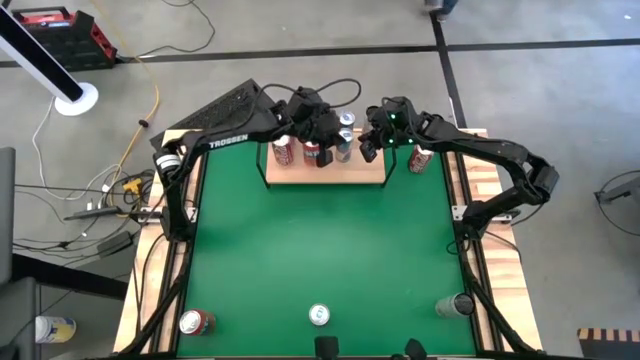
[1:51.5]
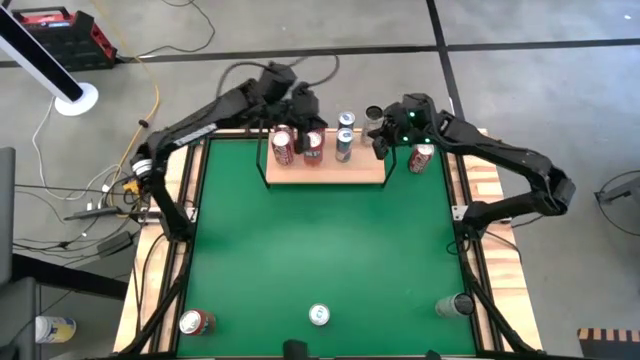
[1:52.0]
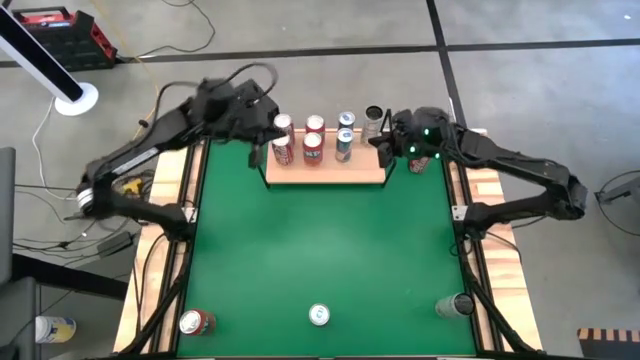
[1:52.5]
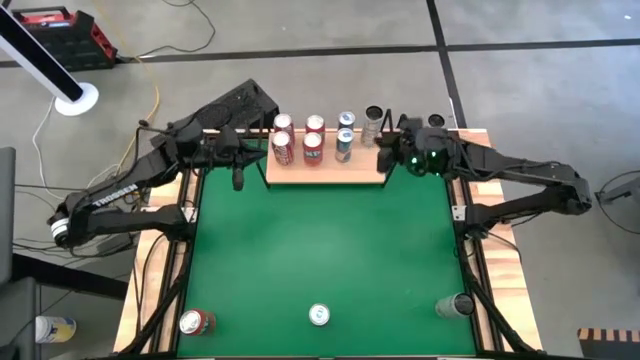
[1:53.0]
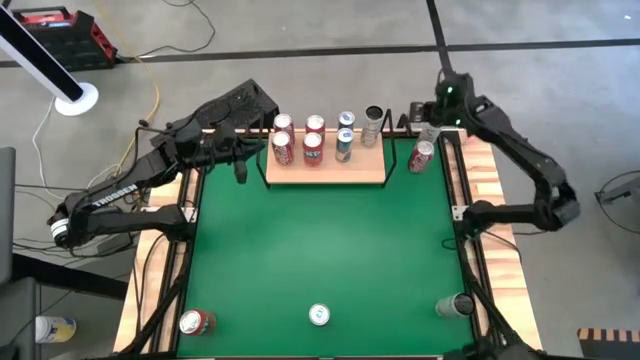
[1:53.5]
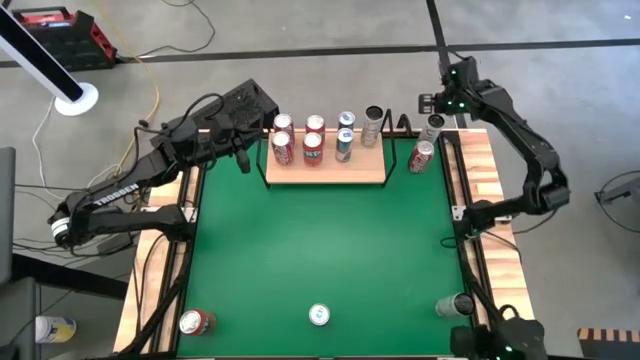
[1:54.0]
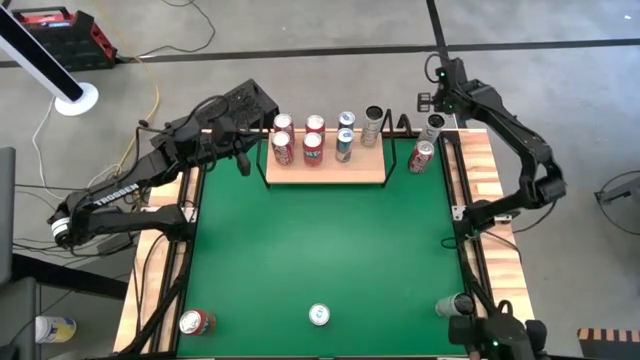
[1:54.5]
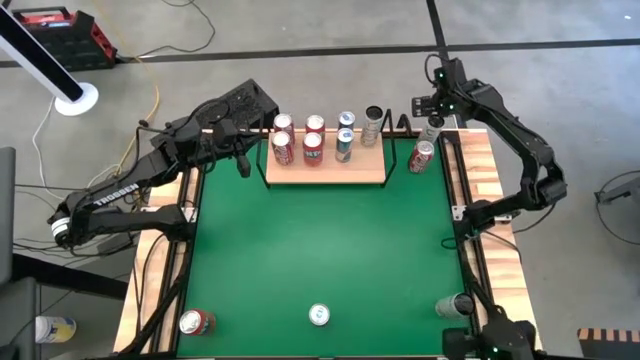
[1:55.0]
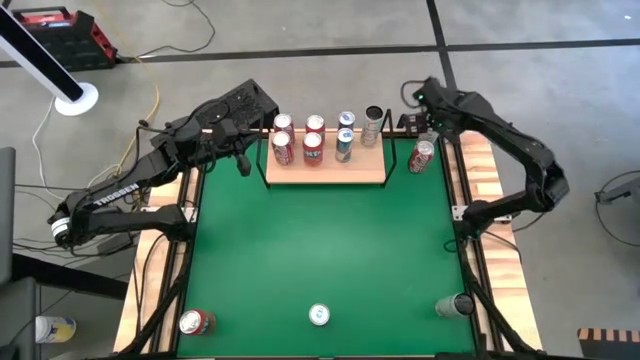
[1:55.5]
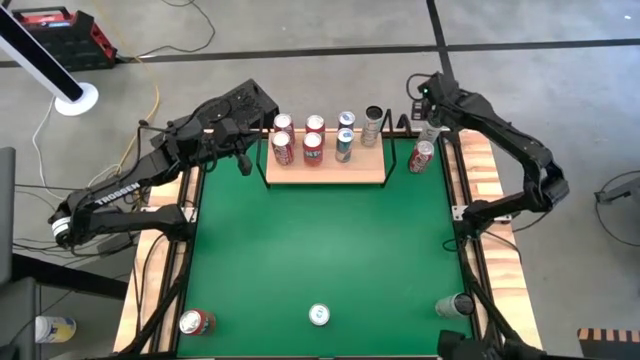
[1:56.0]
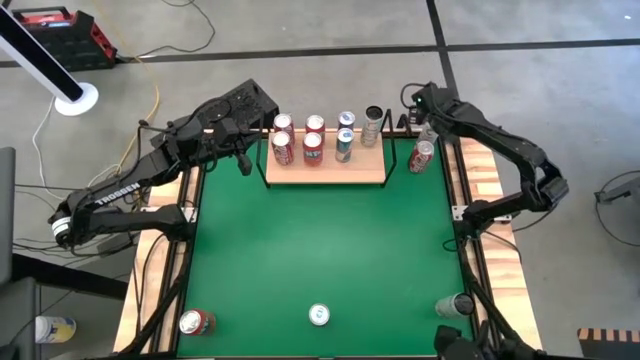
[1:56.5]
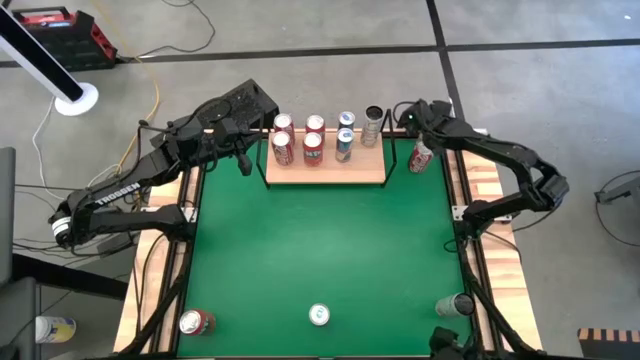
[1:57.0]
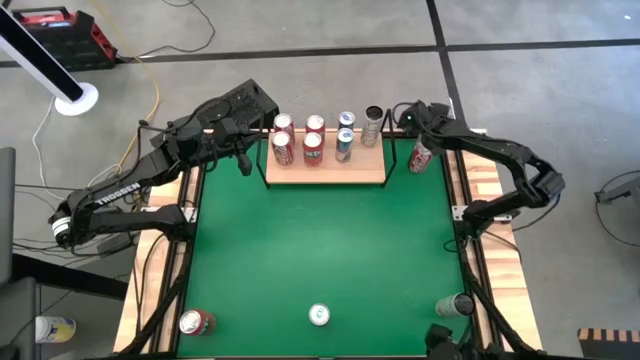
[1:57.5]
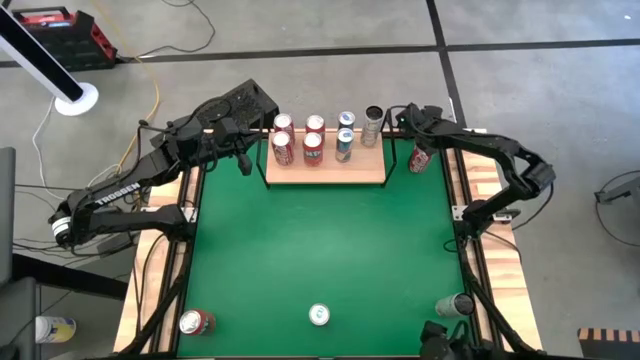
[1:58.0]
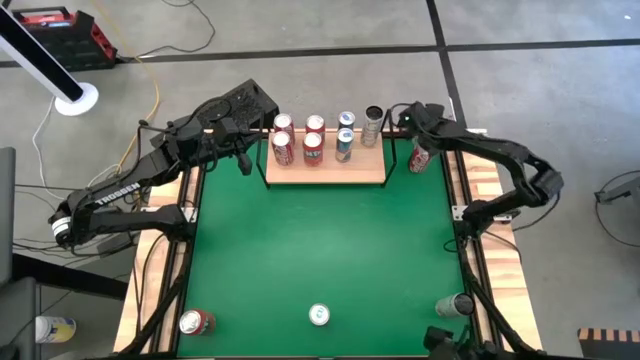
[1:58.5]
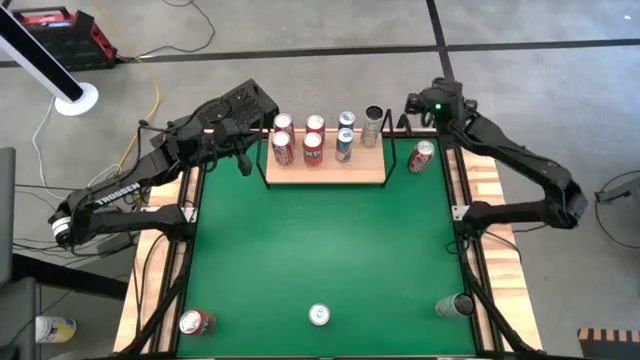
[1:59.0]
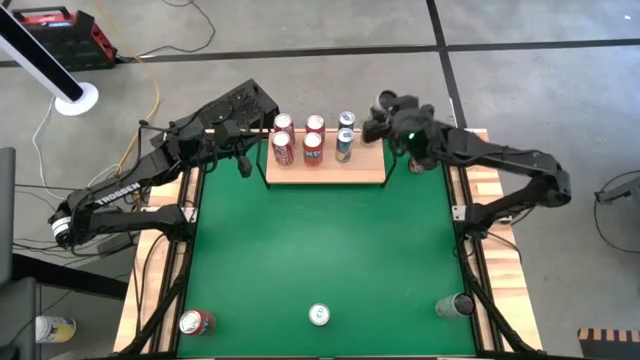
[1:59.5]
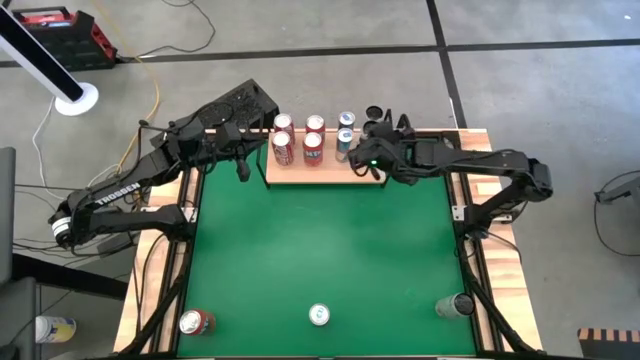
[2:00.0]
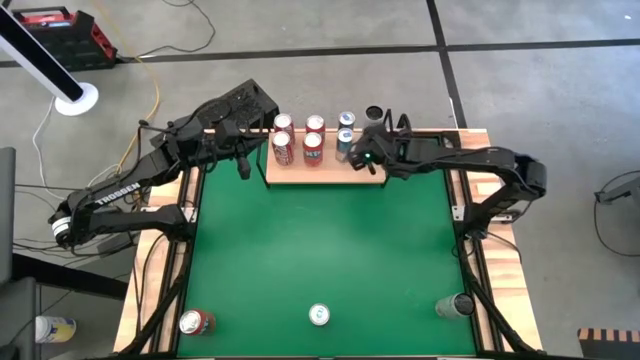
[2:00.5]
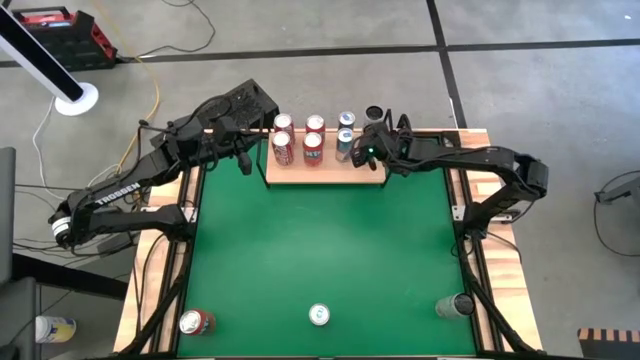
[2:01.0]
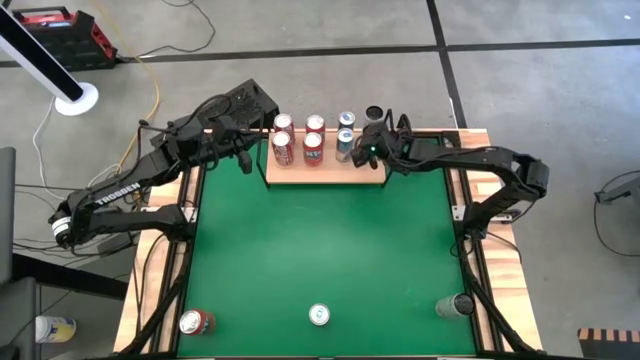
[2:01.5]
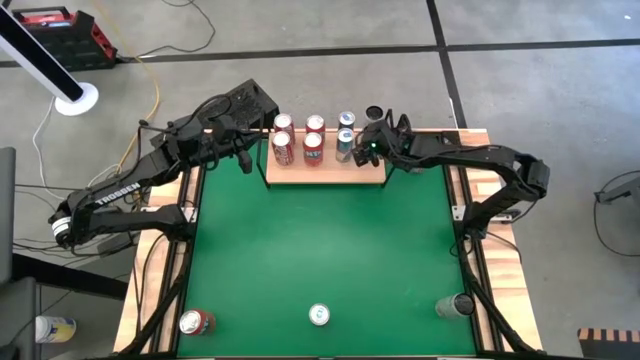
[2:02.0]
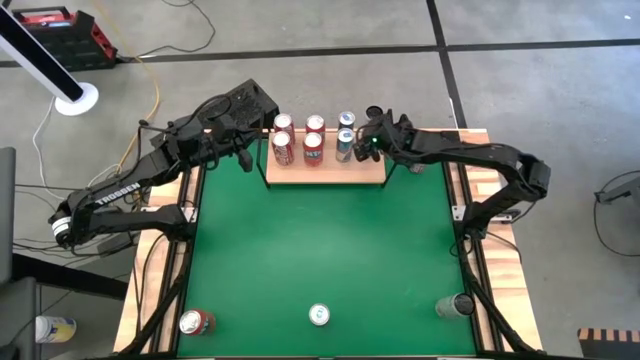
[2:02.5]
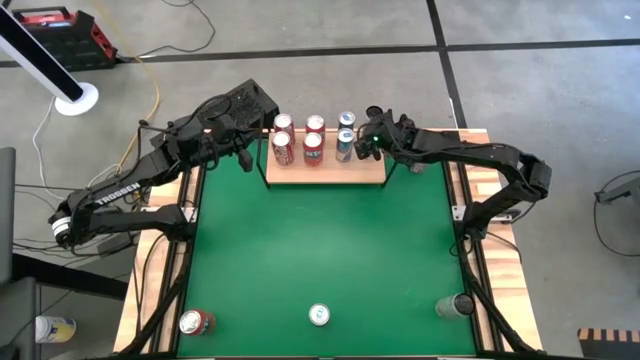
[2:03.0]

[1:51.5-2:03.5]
Task: Place canned beverage on shelf
Put the top white soda can on the shelf

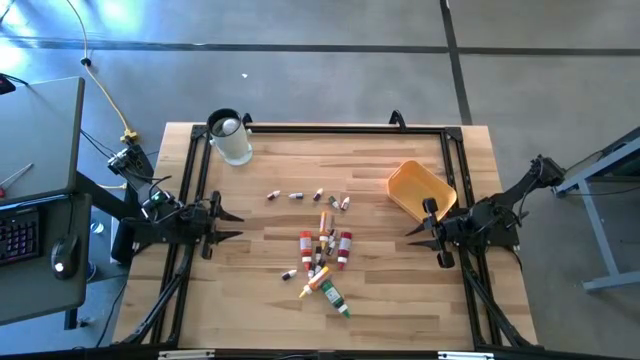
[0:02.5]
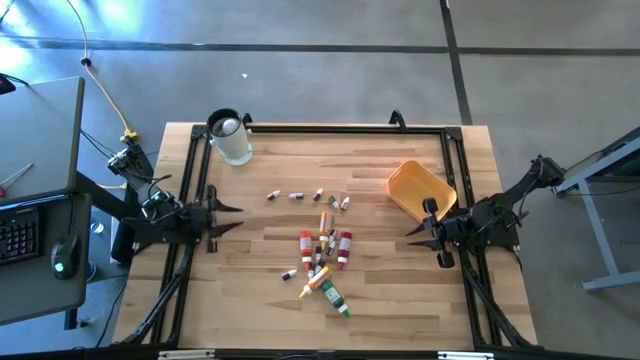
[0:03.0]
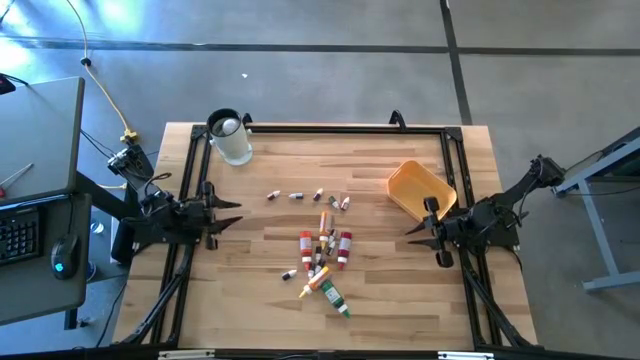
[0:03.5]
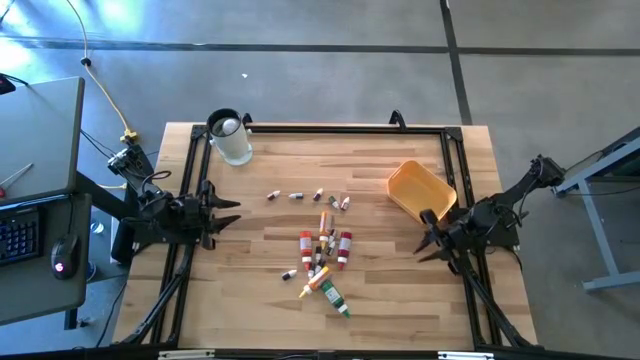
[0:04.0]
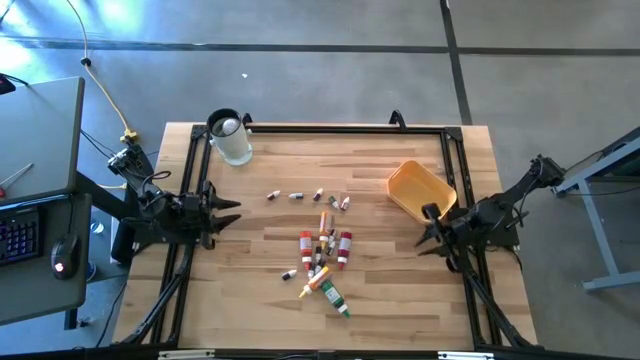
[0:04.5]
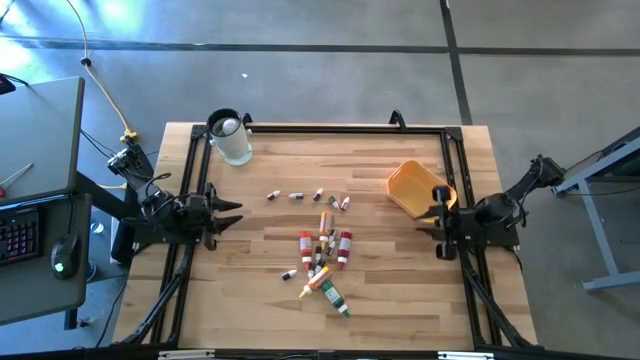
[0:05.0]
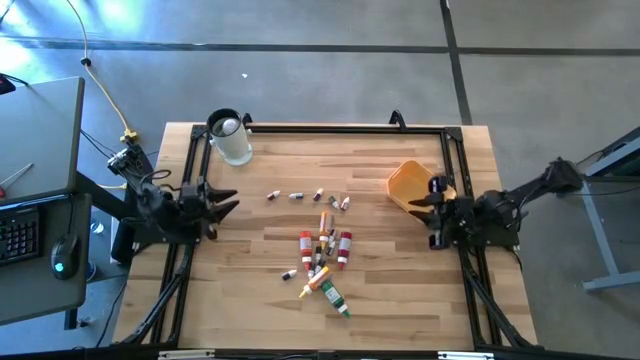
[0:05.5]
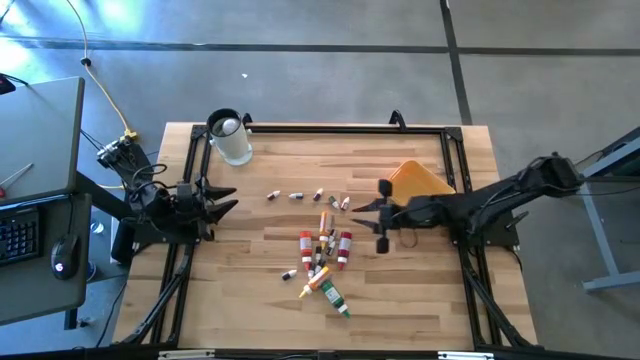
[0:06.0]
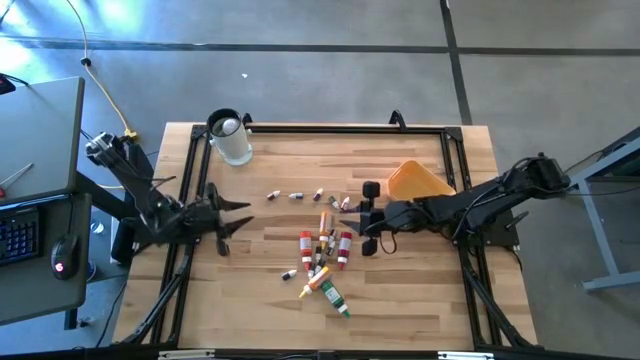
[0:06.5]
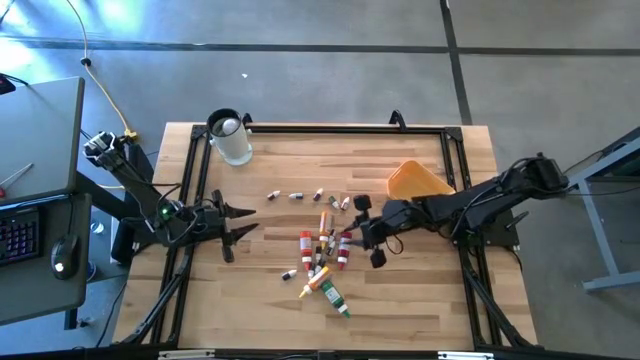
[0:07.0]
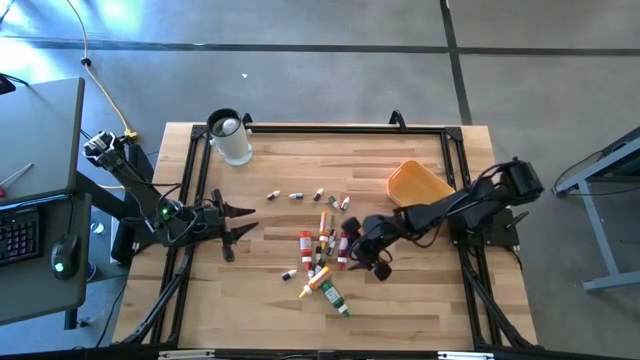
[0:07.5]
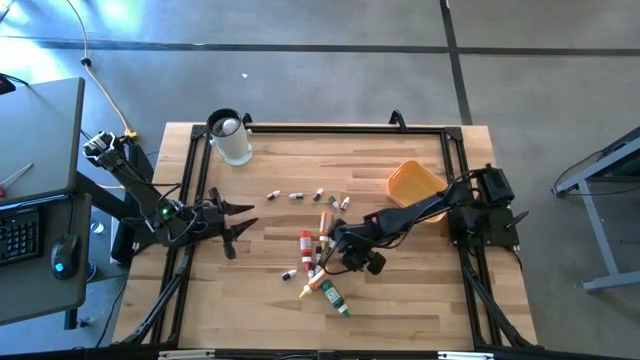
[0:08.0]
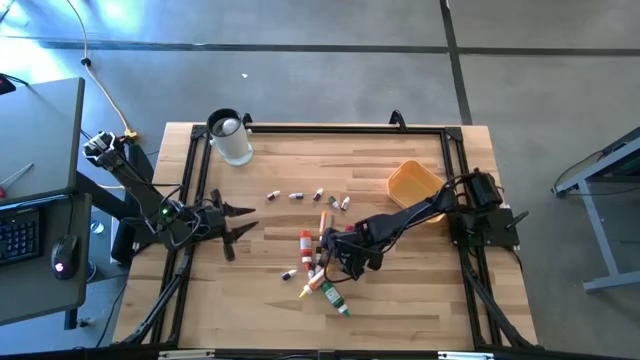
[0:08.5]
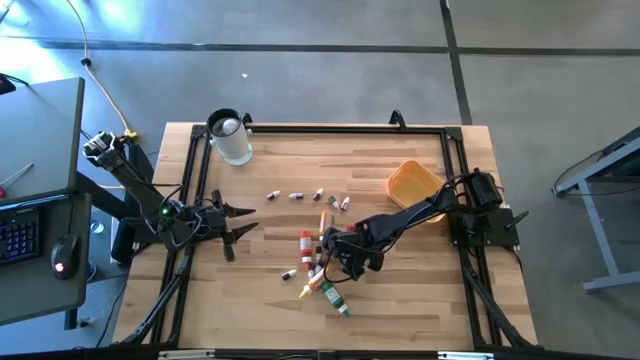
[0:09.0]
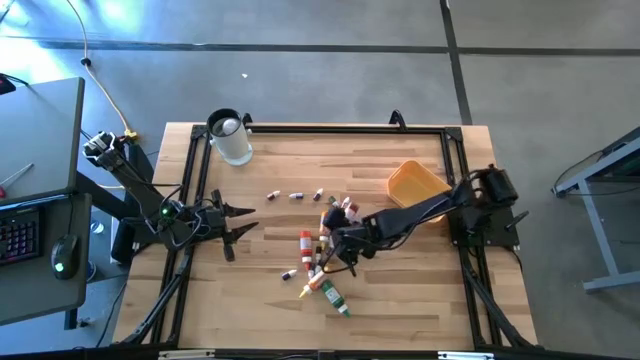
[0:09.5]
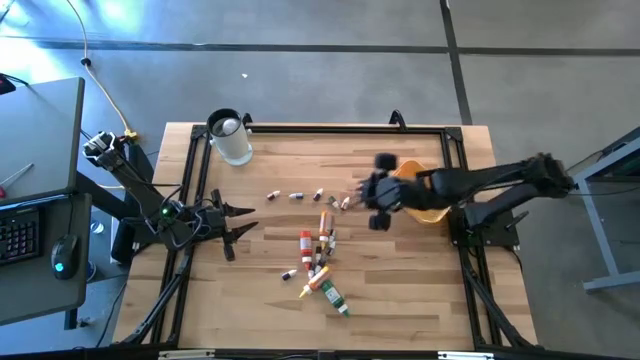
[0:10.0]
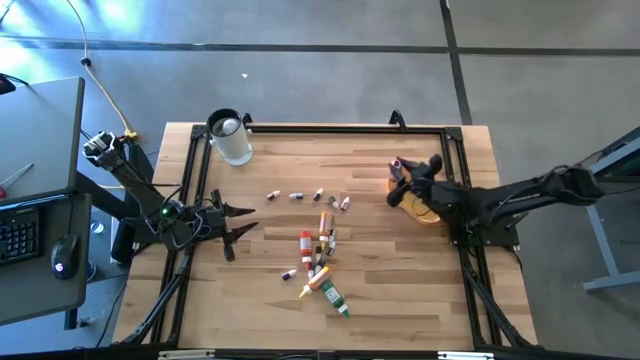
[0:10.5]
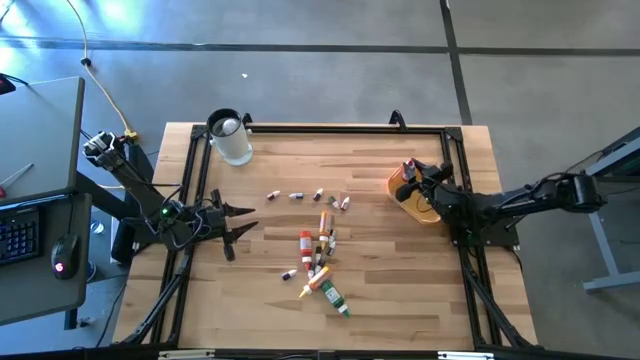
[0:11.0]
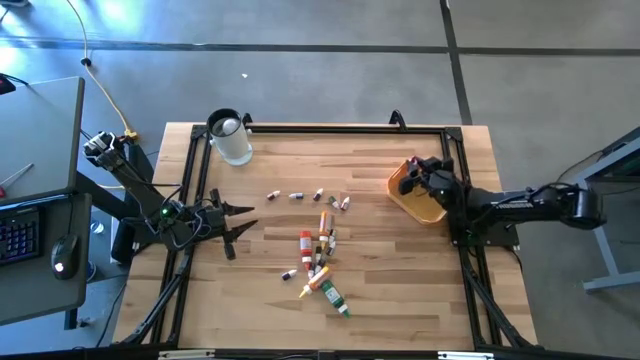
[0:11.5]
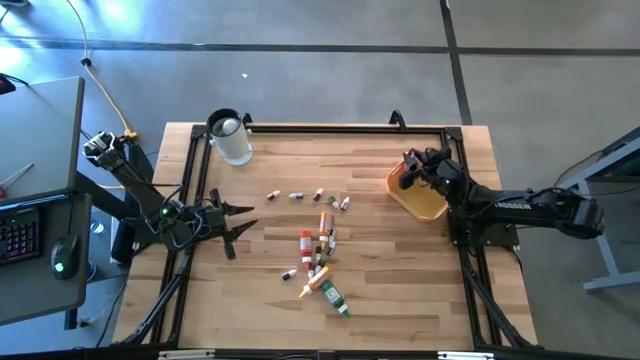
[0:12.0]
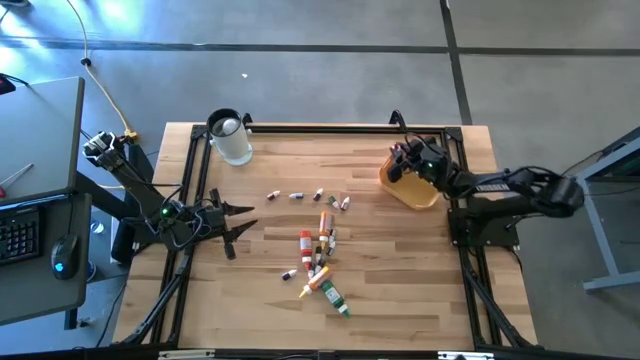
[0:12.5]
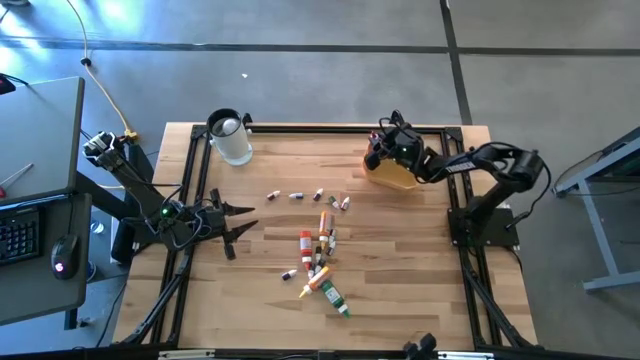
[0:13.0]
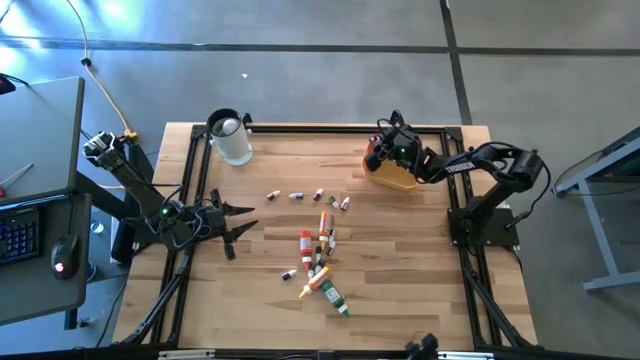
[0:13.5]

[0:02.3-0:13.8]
Task: Pick & Place food coloring
Put the large red food coloring bottle into the yellow bin
